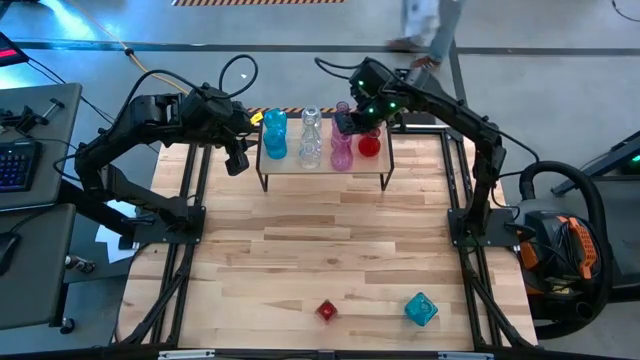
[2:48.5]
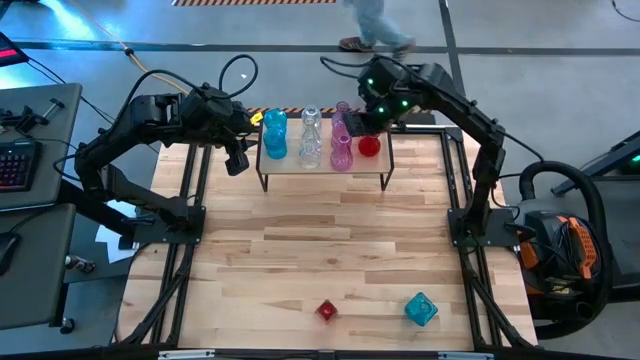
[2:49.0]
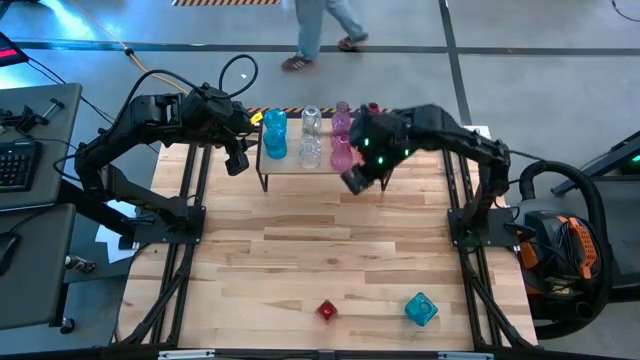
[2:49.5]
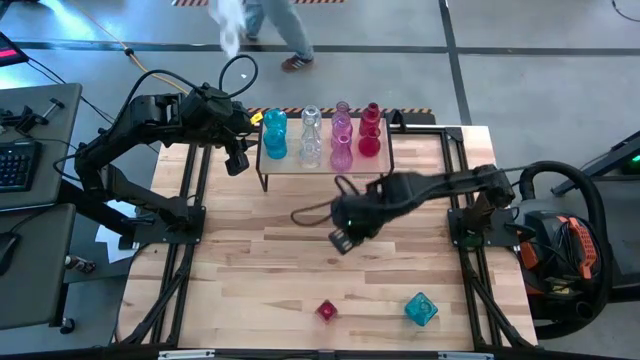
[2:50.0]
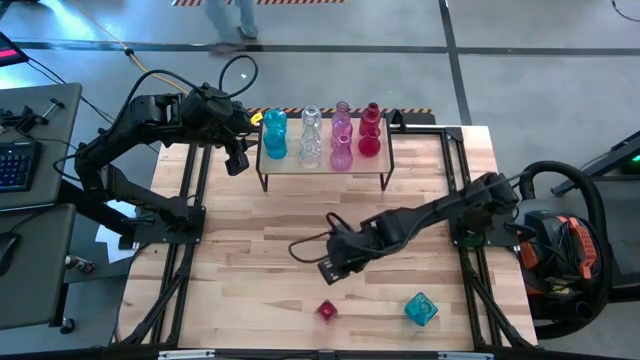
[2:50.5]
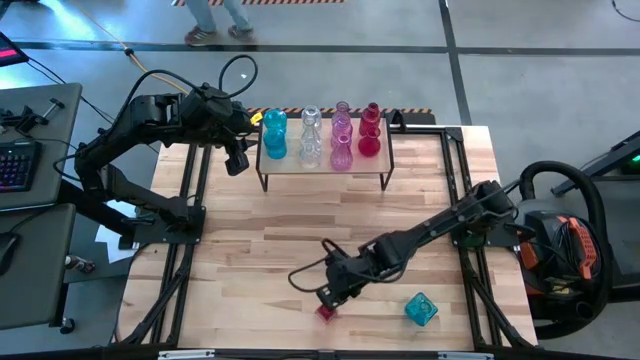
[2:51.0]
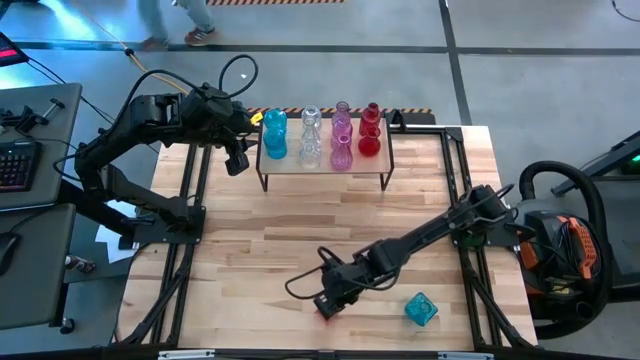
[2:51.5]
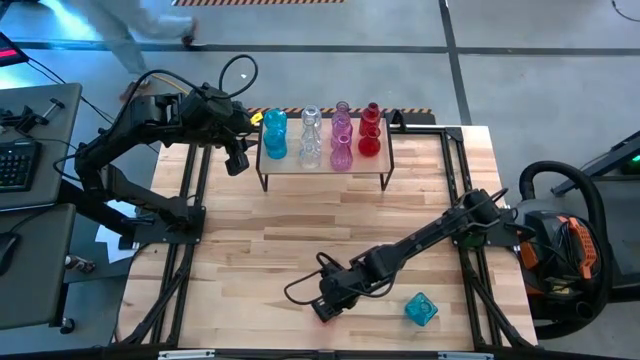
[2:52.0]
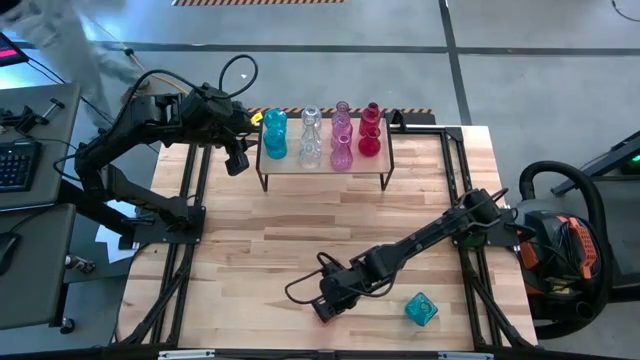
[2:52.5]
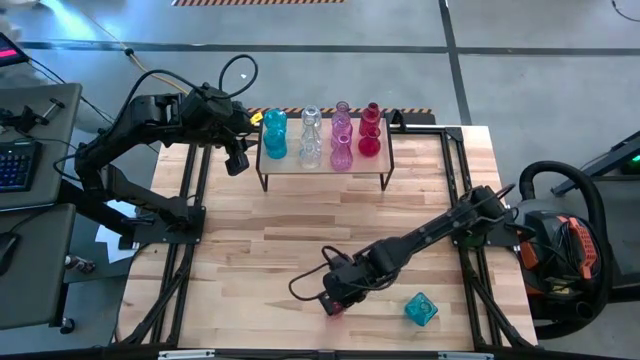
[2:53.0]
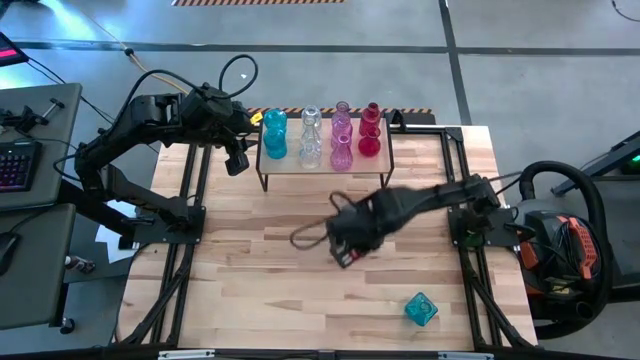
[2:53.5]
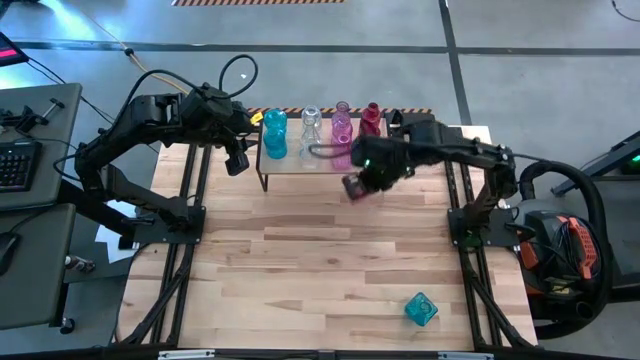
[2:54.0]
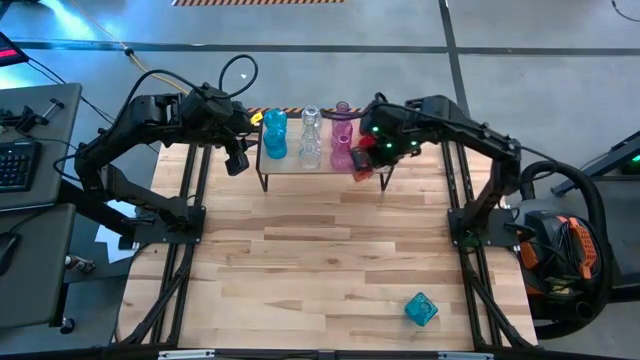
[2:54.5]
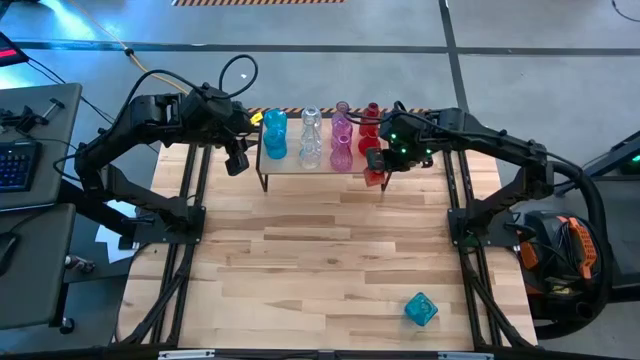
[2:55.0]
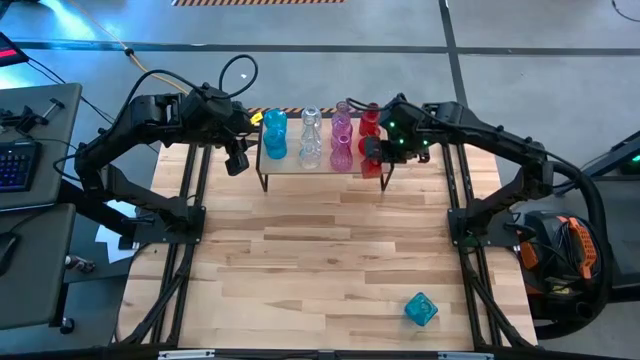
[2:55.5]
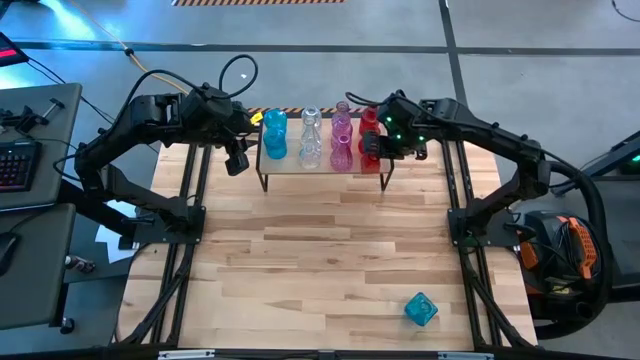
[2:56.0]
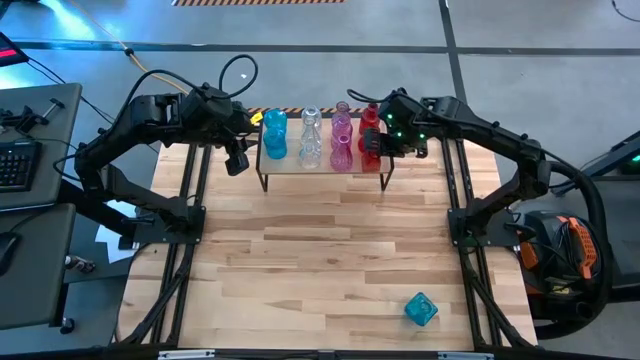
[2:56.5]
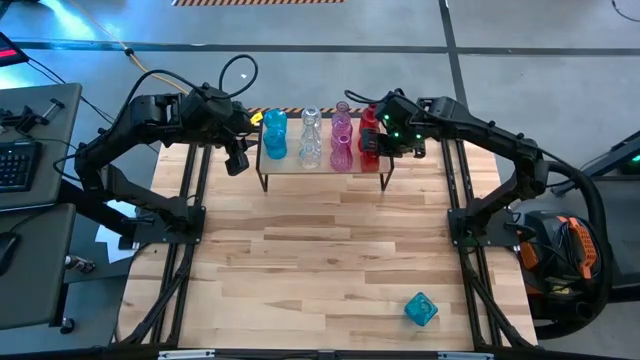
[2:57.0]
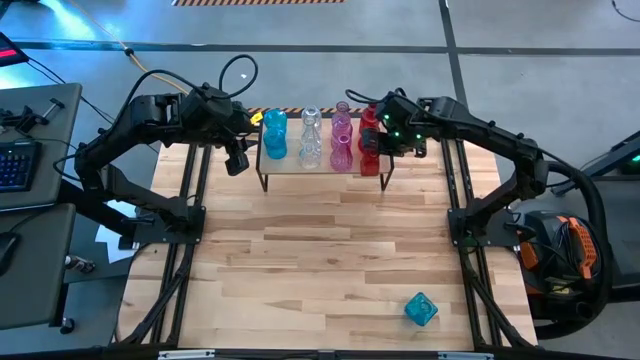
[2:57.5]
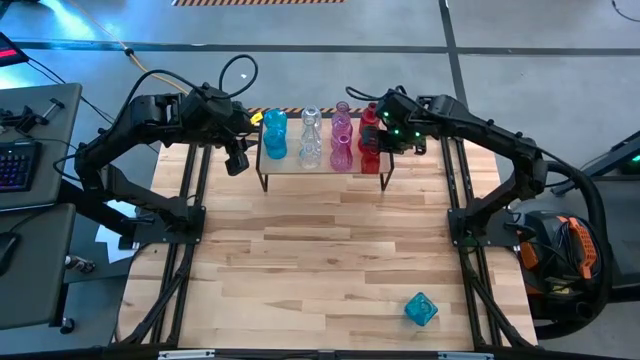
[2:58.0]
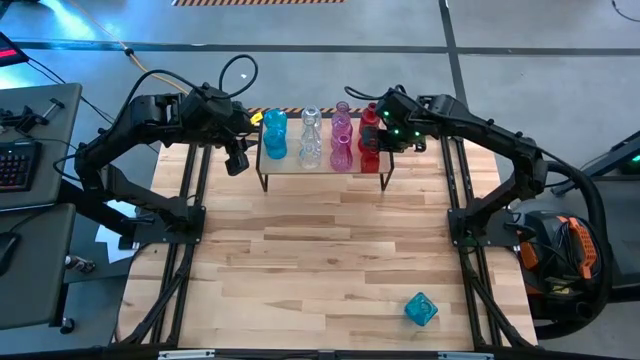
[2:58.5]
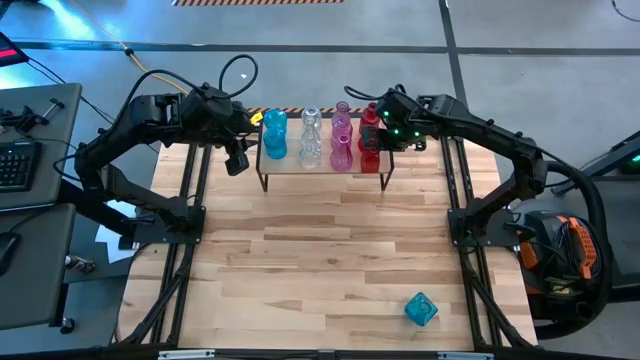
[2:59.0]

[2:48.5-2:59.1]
Task: sort vases onto shelf
Put the red vase on the shelf aligned with the other red vase

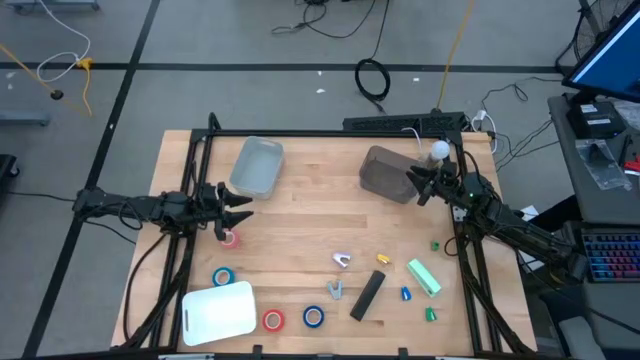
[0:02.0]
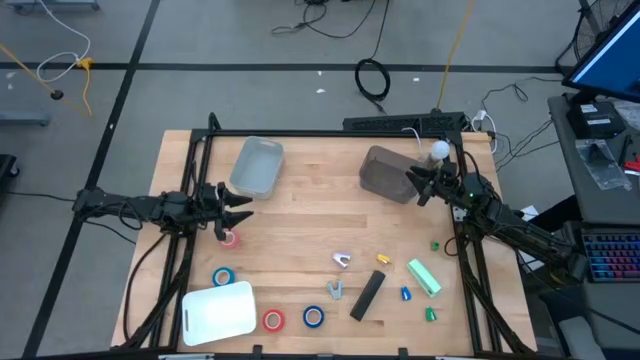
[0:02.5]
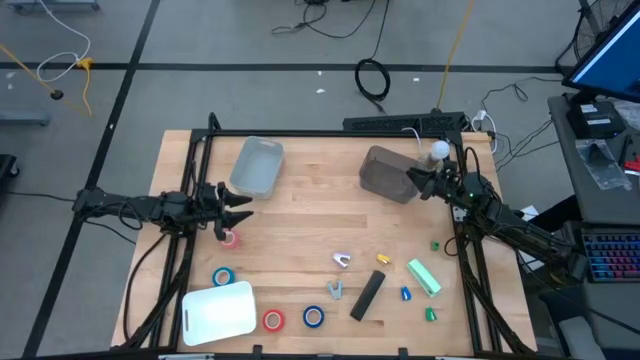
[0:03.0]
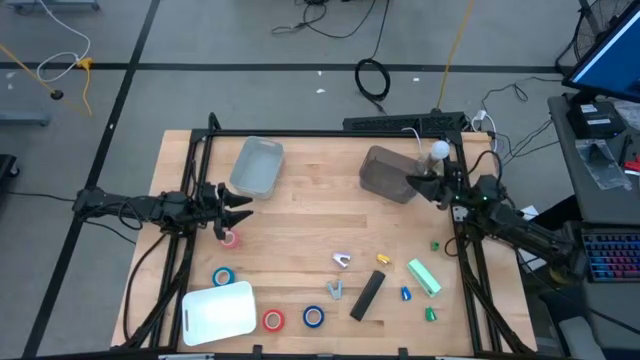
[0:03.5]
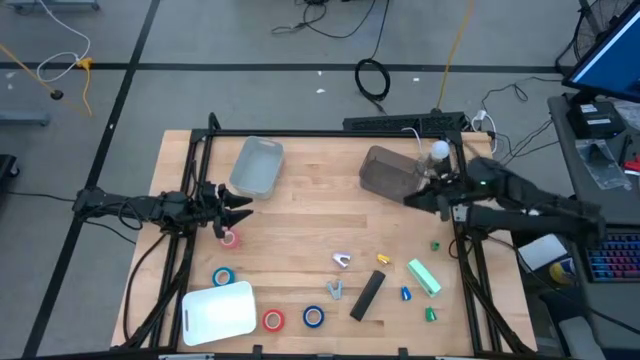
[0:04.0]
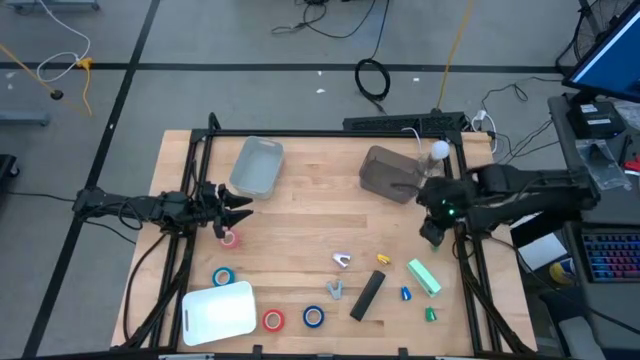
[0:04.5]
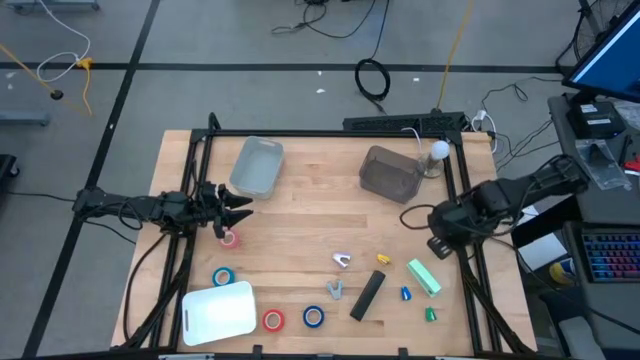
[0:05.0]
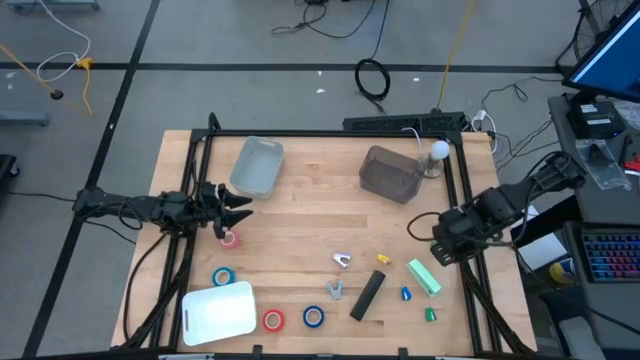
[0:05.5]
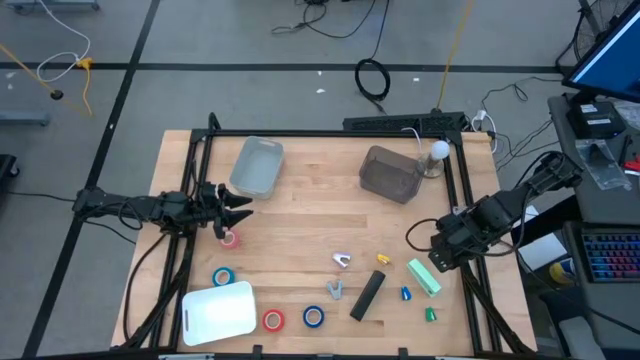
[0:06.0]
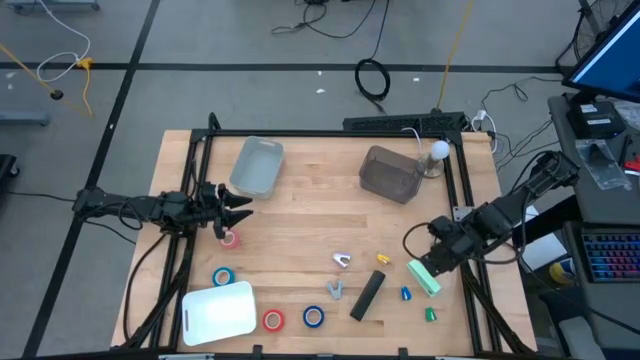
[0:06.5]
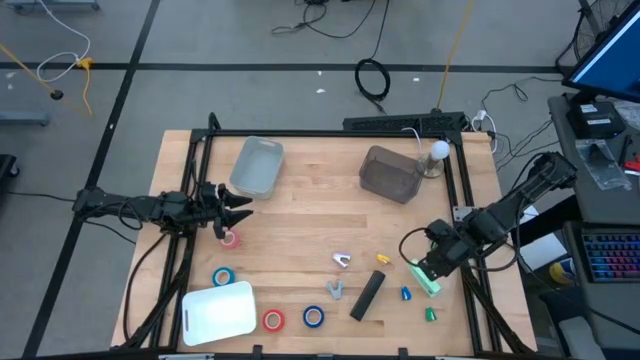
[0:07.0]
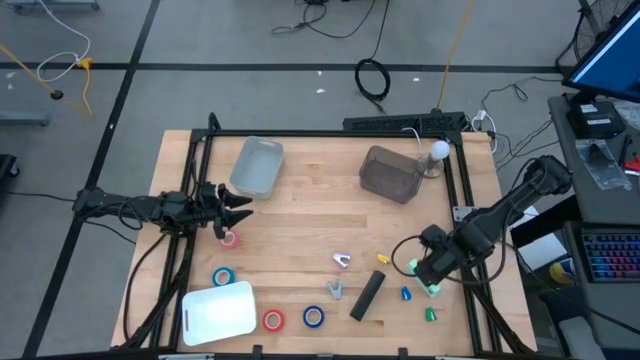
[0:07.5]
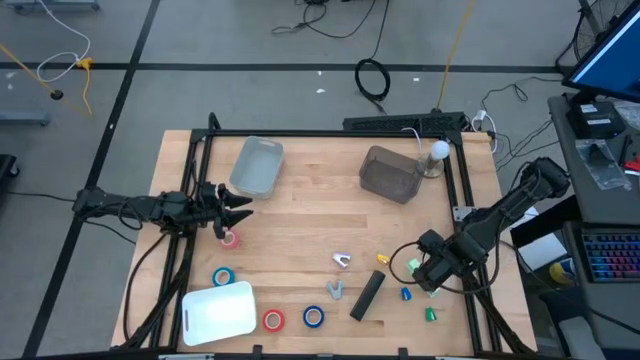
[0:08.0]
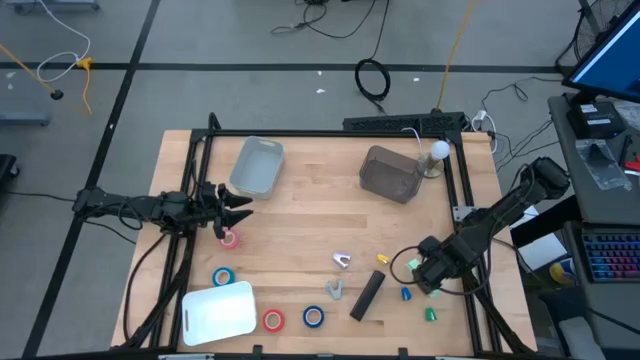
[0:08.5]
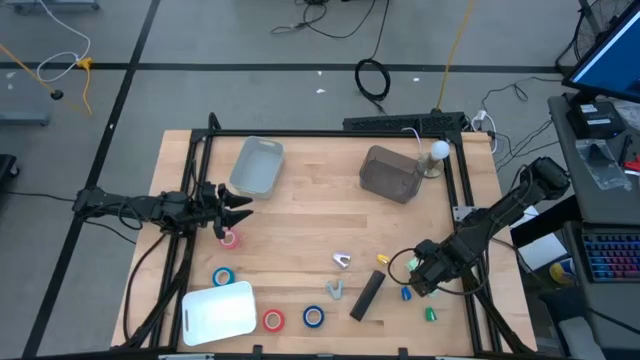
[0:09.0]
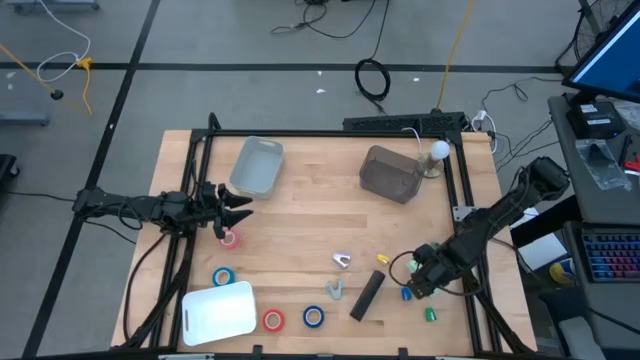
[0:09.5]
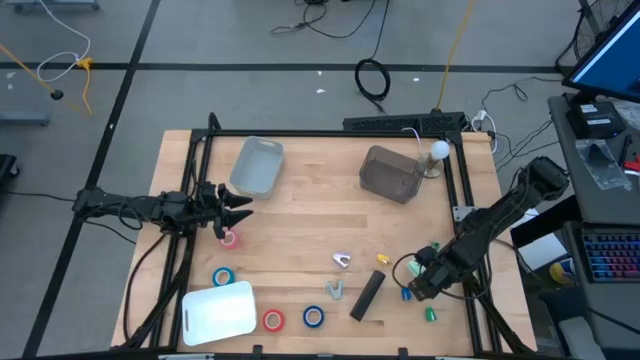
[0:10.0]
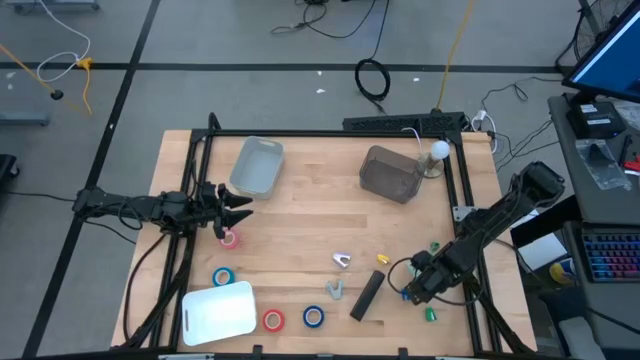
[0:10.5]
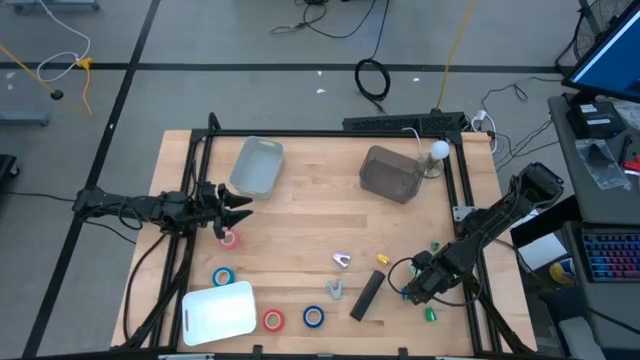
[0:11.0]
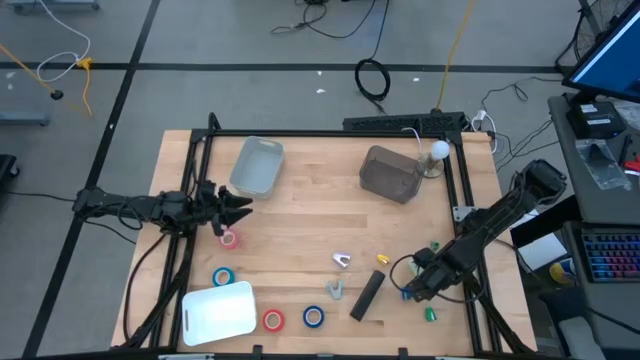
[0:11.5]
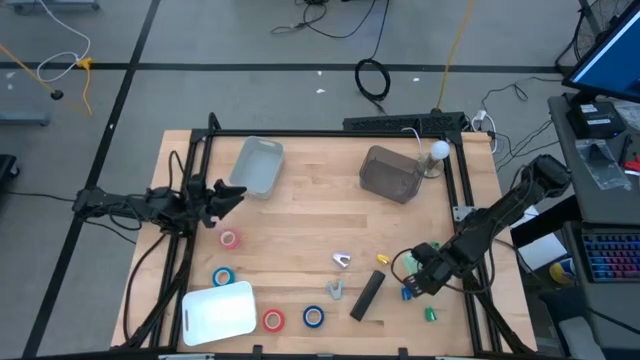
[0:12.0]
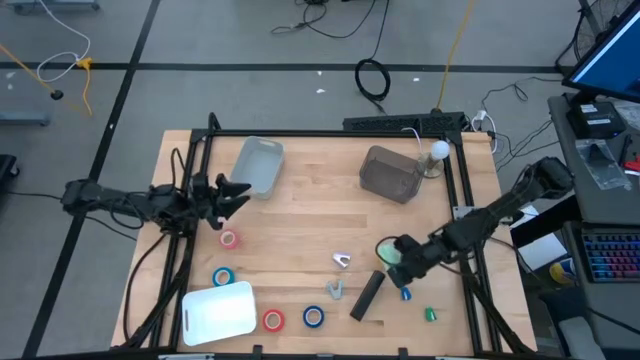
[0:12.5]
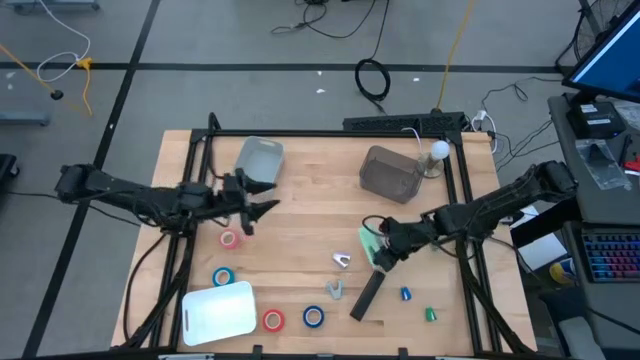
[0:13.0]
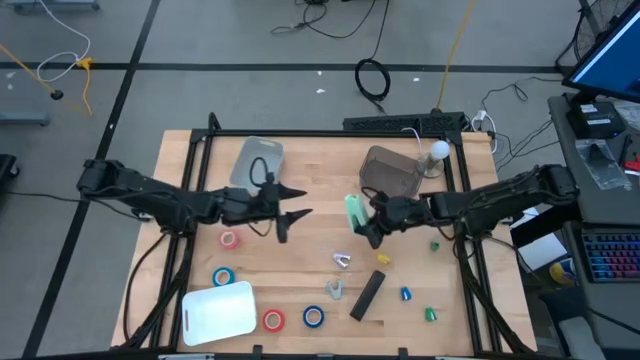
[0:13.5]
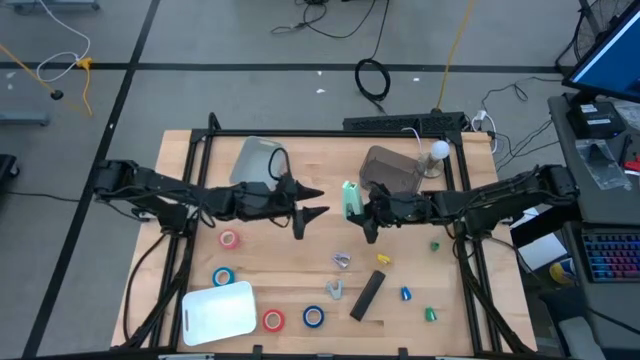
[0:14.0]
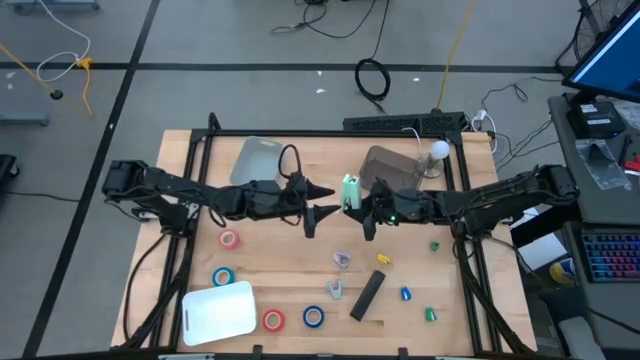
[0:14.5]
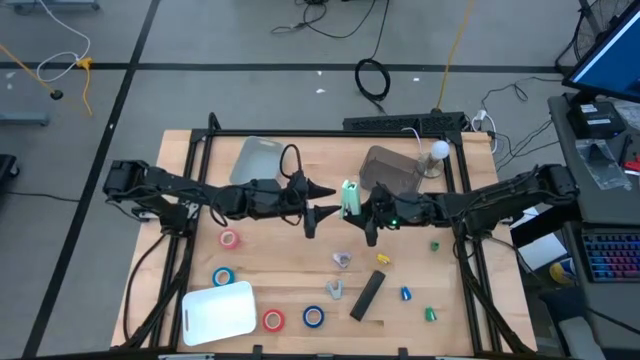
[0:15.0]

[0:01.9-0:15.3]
Task: Pick and place Stapler, Stapler remover, tape
Put the green stapler into the gray bin
